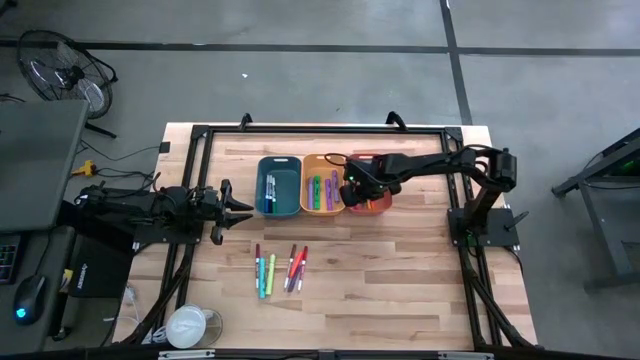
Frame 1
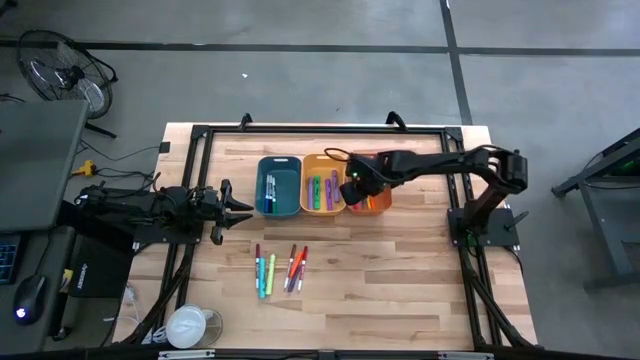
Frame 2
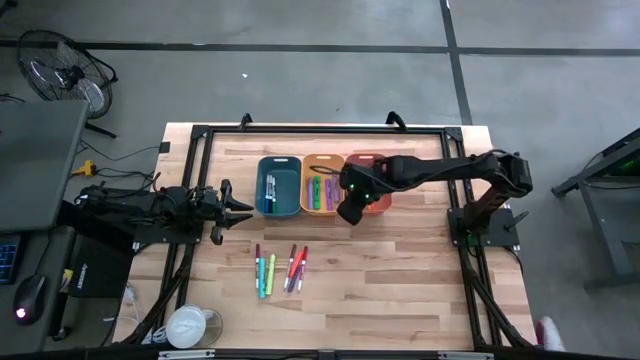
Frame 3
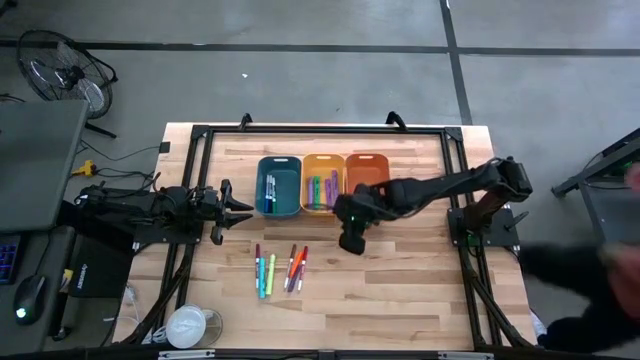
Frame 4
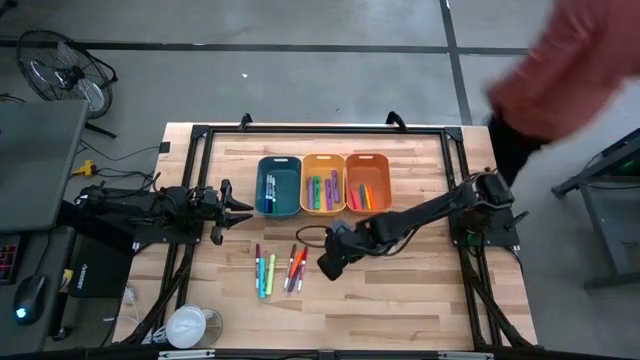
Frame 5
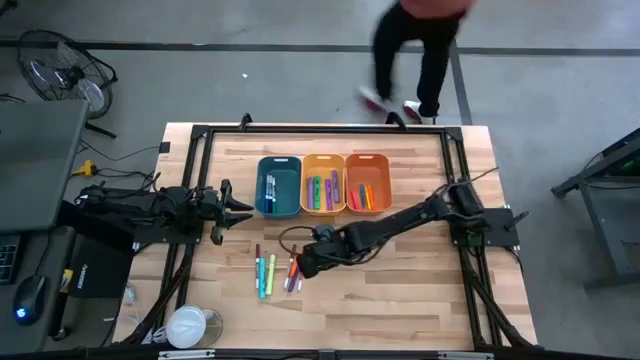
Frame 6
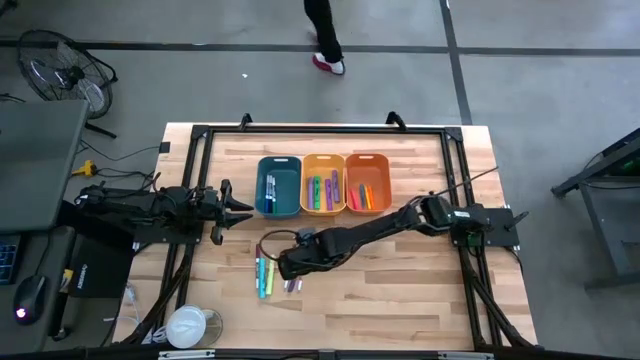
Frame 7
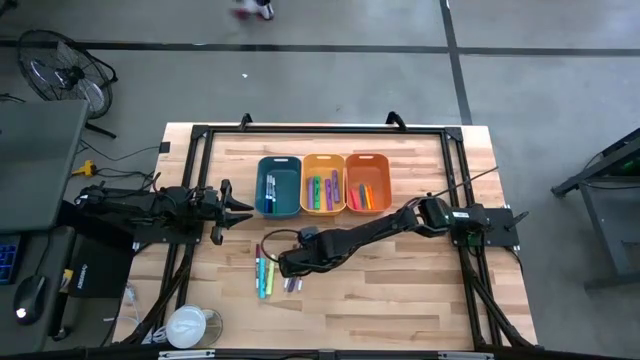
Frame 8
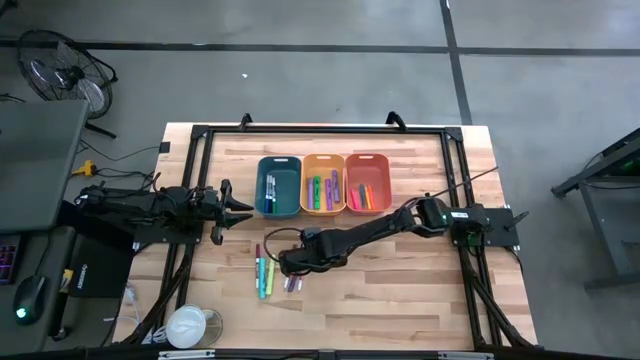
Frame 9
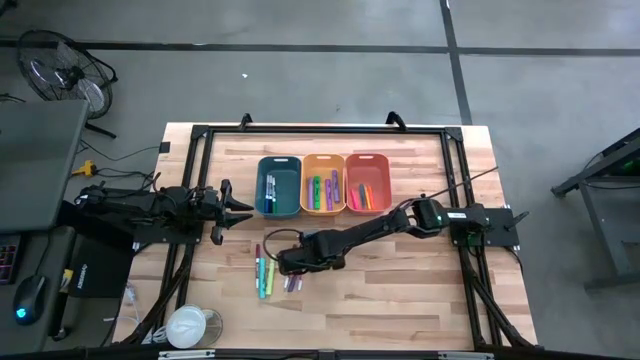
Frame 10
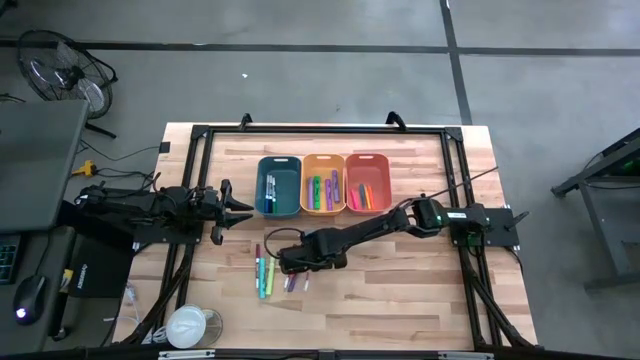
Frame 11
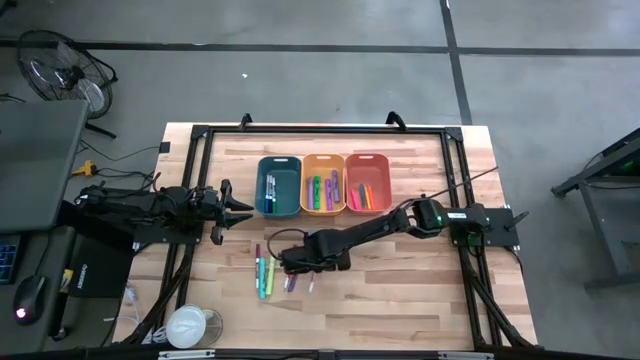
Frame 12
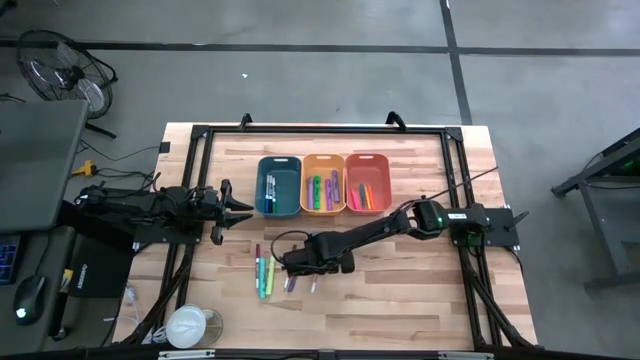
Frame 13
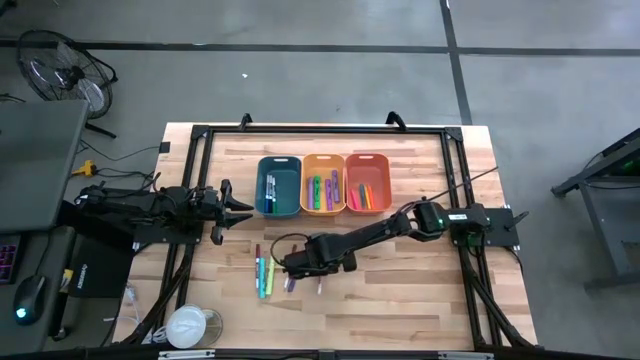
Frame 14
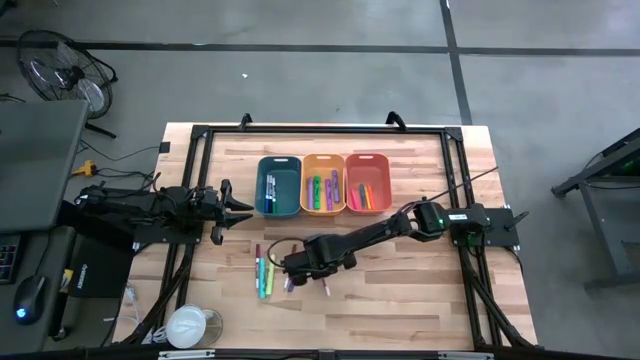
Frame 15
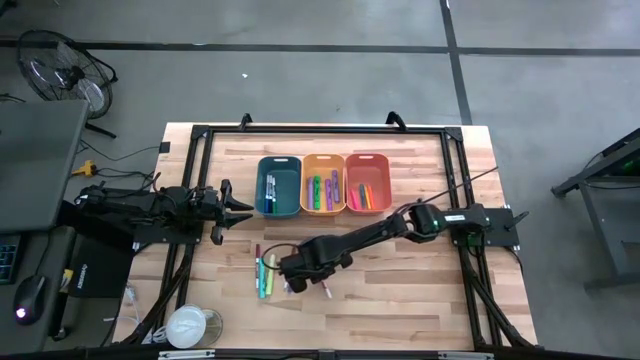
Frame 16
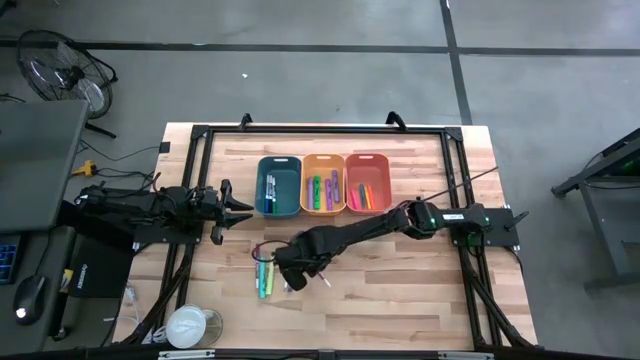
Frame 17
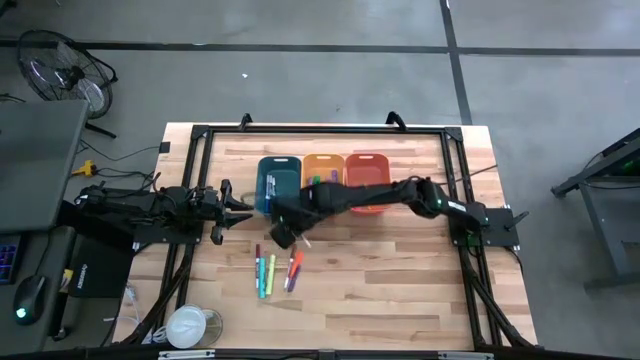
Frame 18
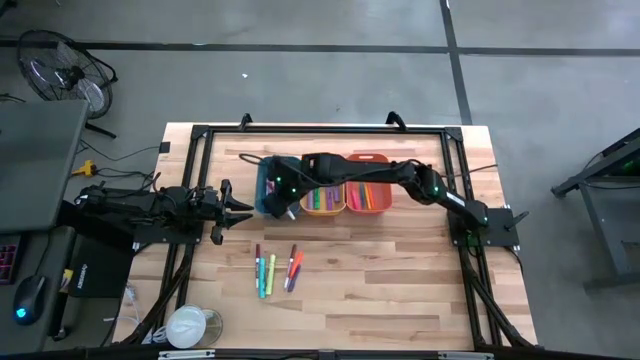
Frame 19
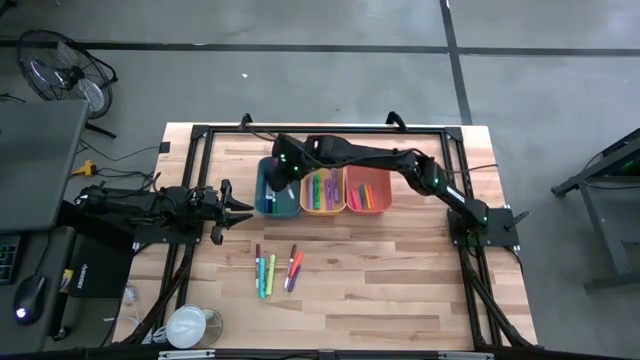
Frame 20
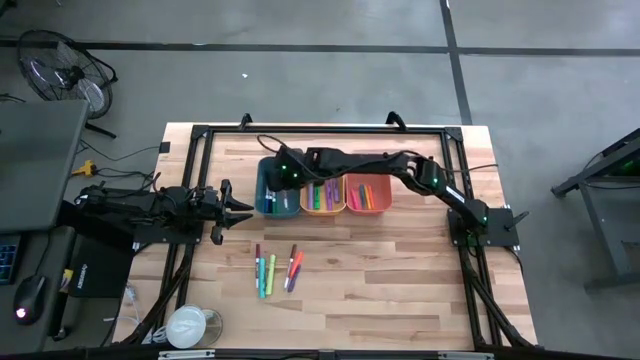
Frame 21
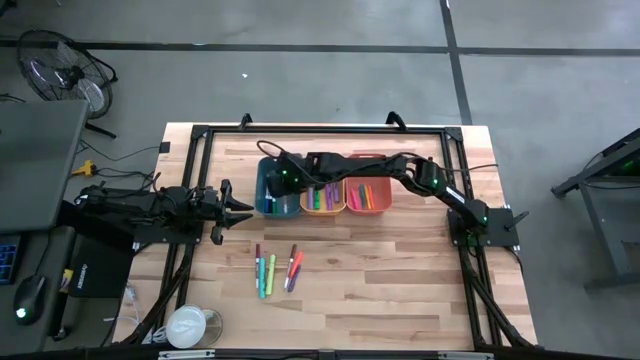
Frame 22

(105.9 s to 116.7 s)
Task: Pick & Place Markers
Put the red marker pen into the blue bin

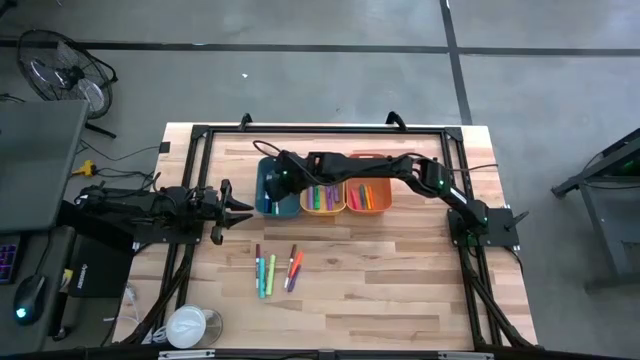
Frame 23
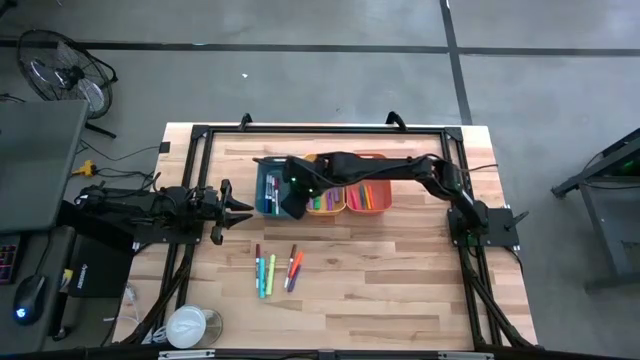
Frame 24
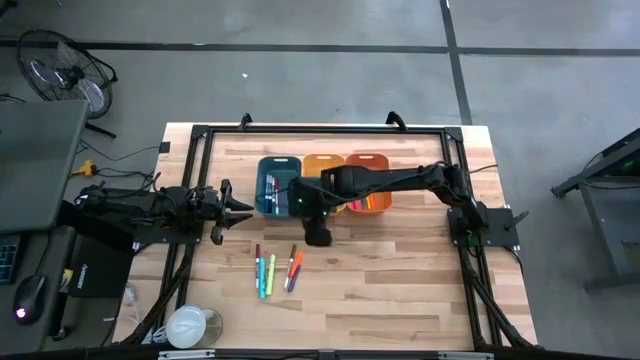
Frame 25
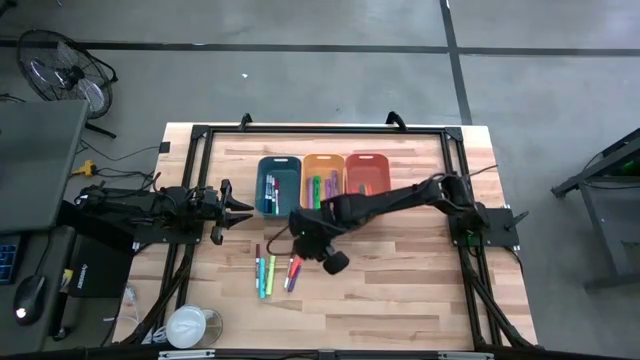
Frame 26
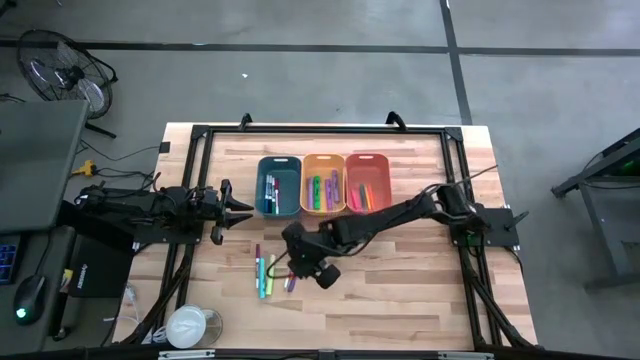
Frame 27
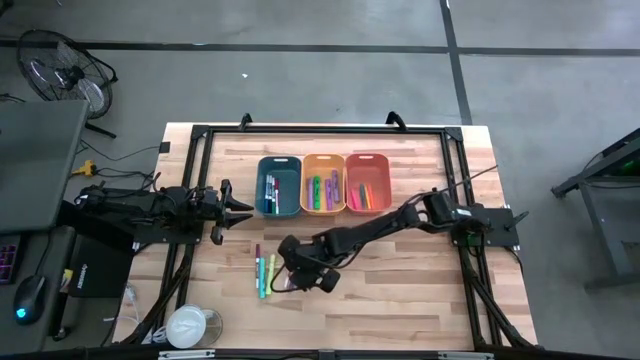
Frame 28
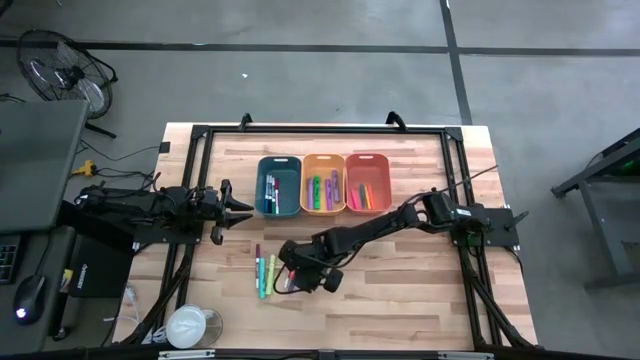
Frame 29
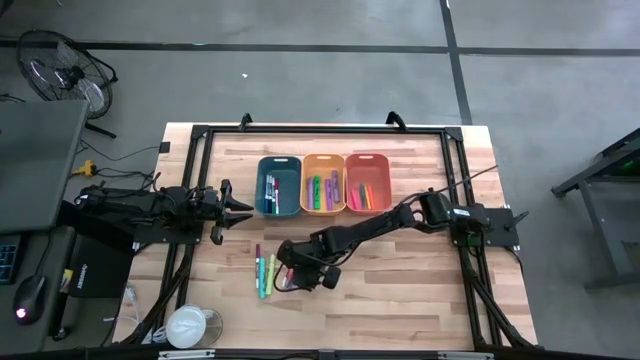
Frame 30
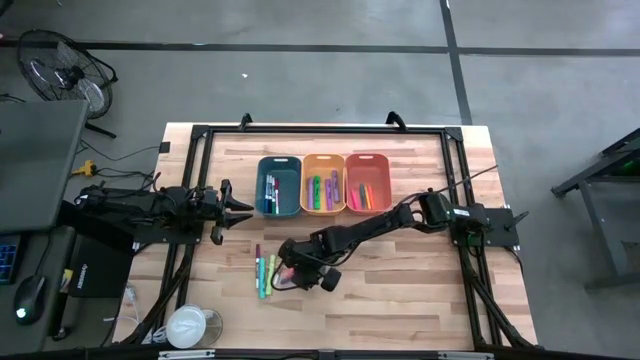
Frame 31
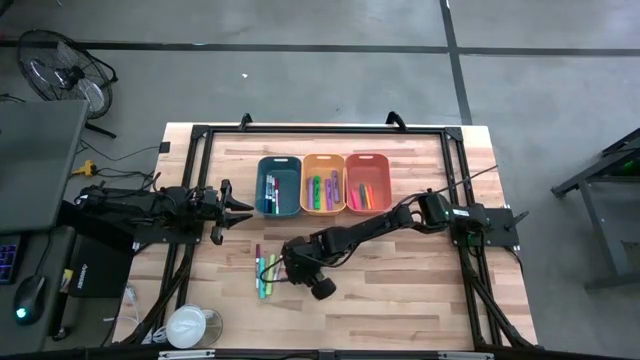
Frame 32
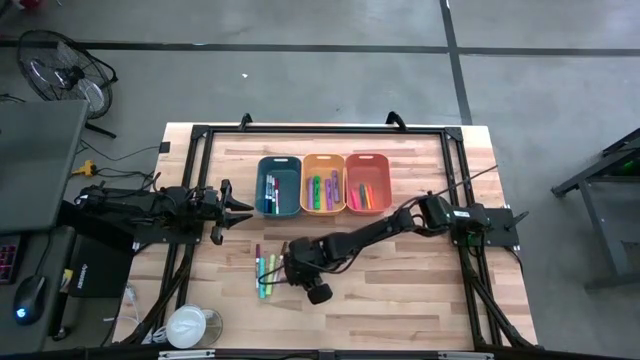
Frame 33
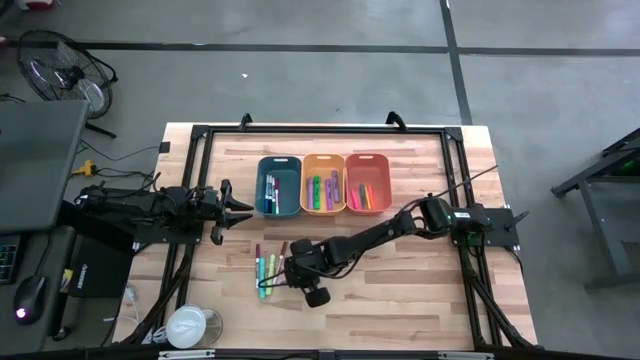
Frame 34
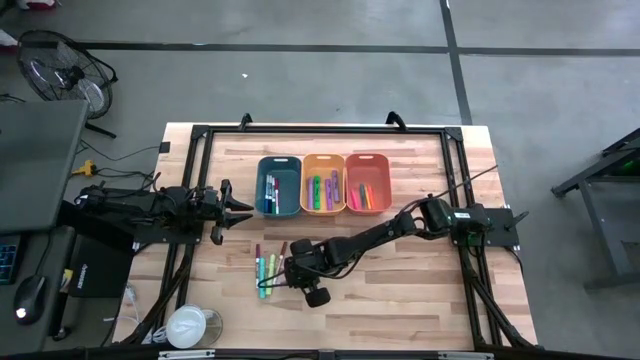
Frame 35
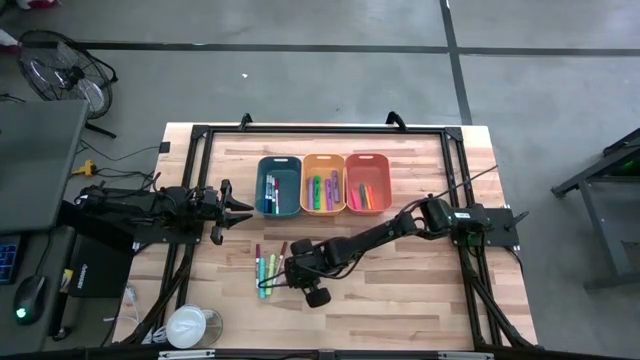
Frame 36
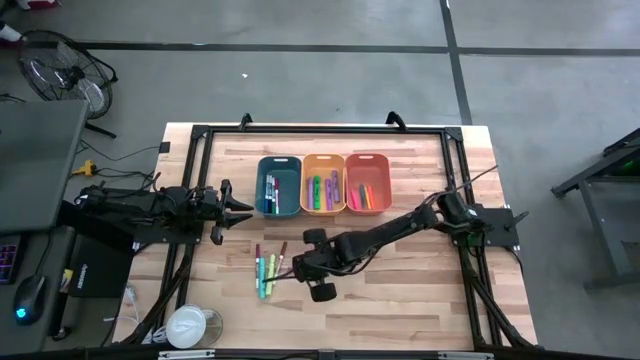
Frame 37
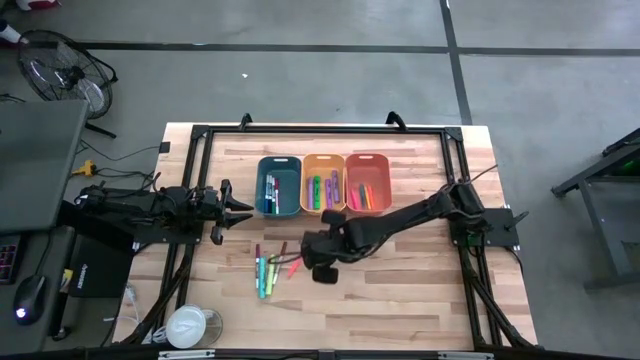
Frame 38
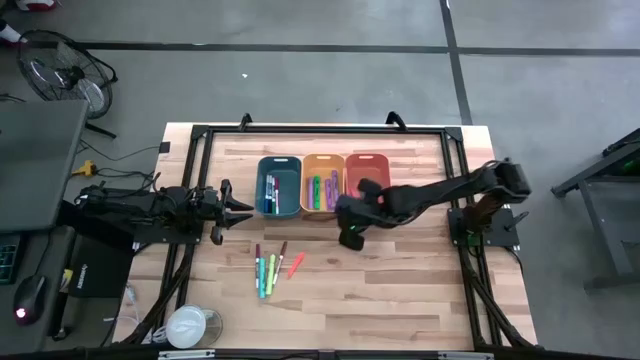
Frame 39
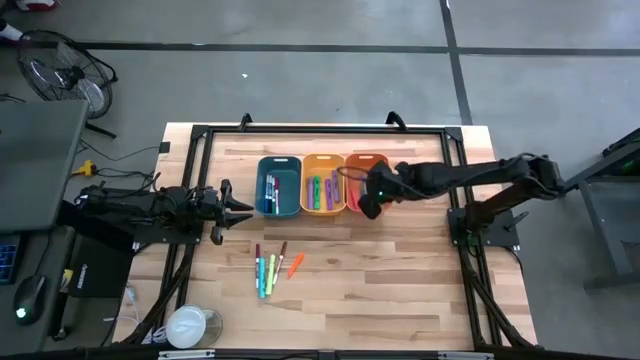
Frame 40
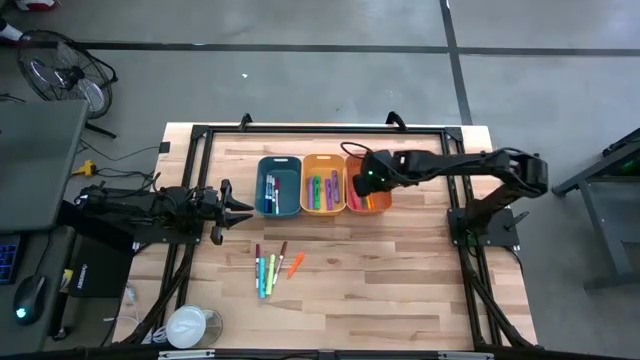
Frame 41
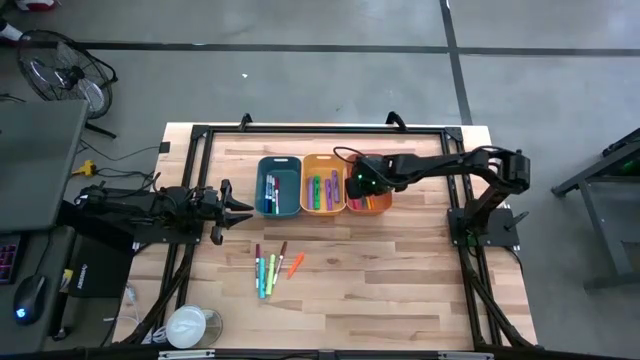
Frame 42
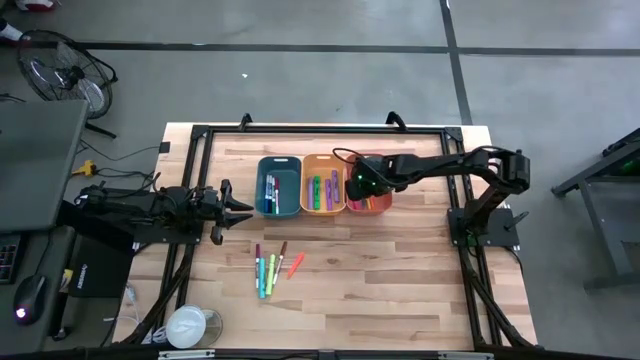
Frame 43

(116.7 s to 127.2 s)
Put the violet pen into the orange bin
